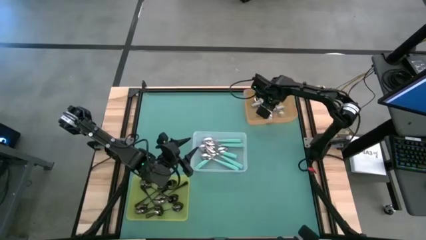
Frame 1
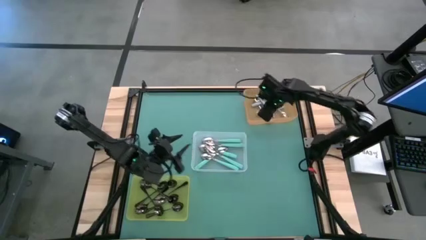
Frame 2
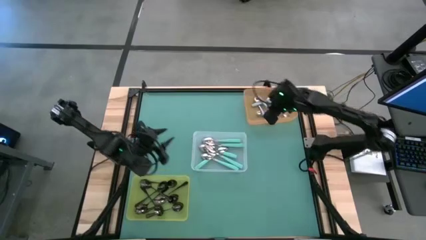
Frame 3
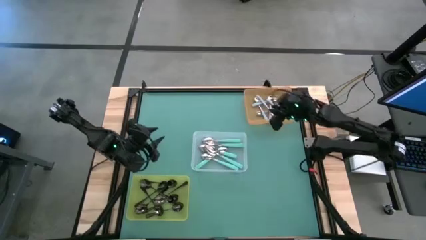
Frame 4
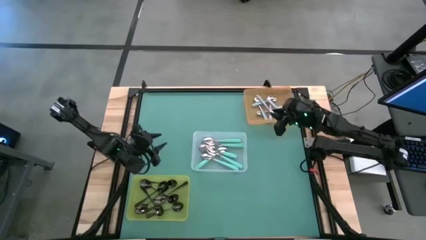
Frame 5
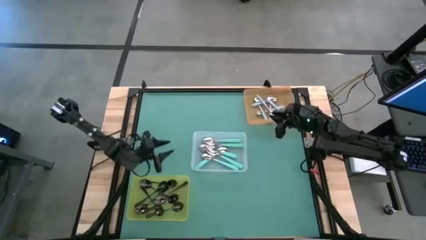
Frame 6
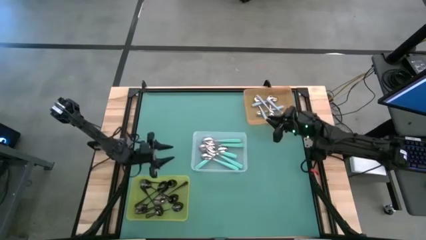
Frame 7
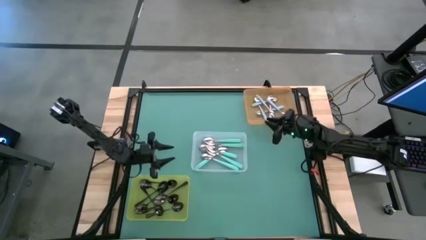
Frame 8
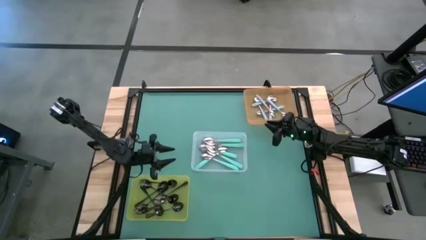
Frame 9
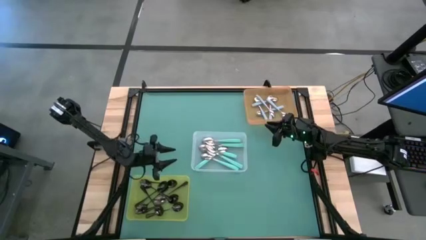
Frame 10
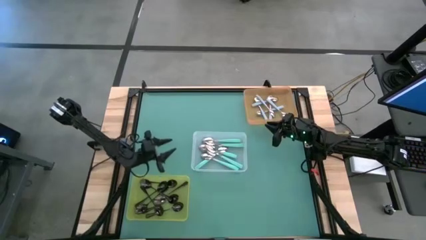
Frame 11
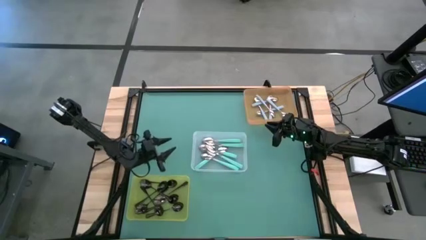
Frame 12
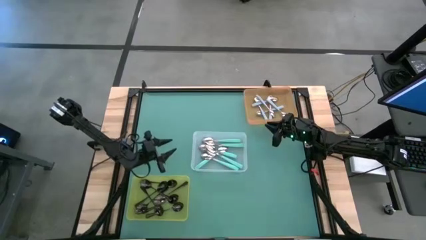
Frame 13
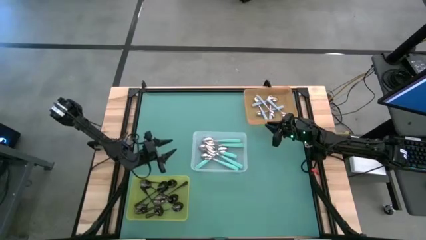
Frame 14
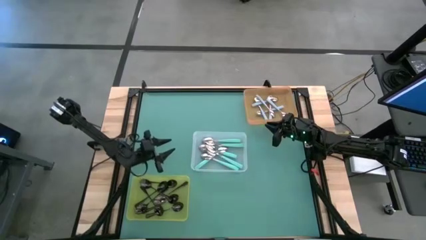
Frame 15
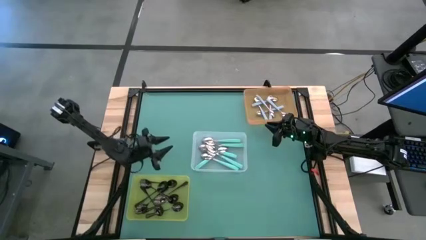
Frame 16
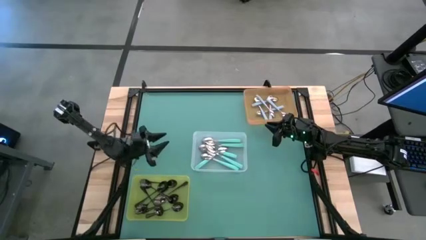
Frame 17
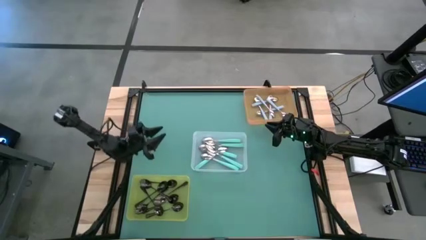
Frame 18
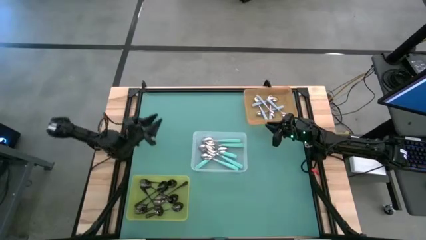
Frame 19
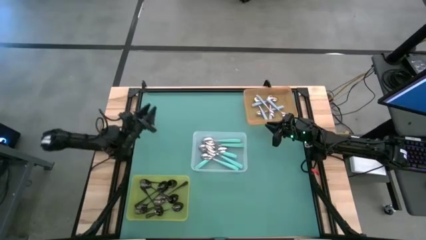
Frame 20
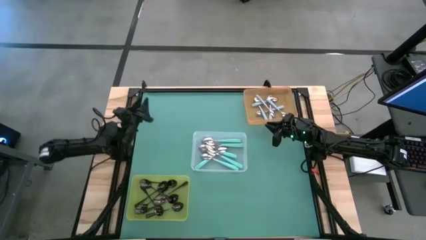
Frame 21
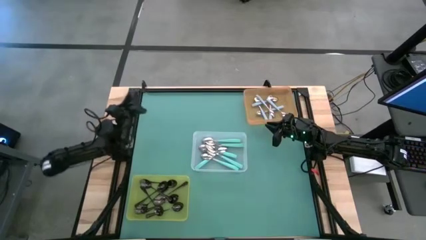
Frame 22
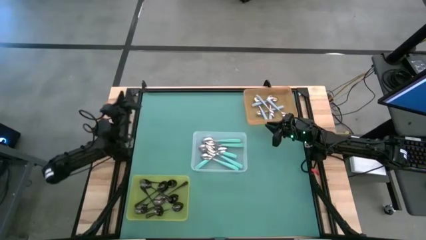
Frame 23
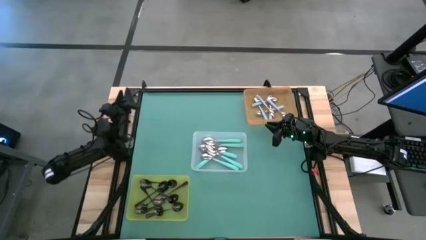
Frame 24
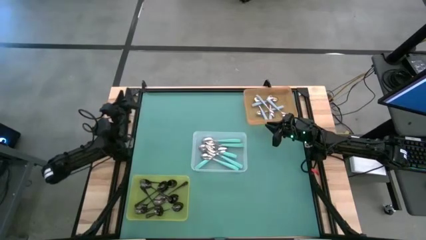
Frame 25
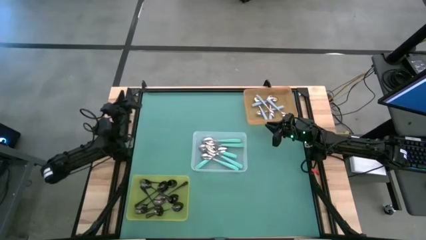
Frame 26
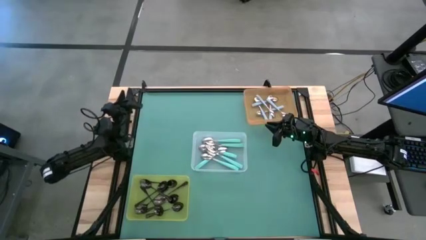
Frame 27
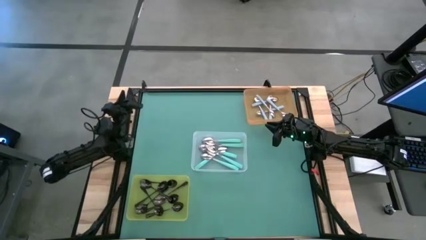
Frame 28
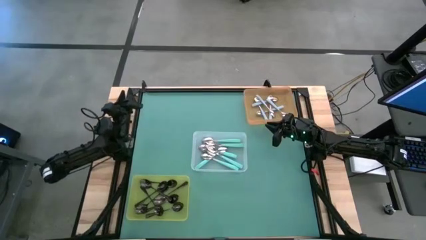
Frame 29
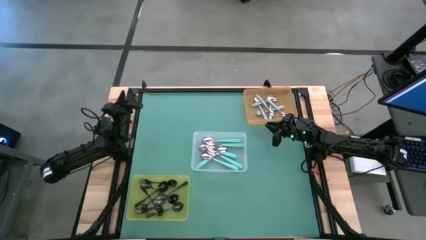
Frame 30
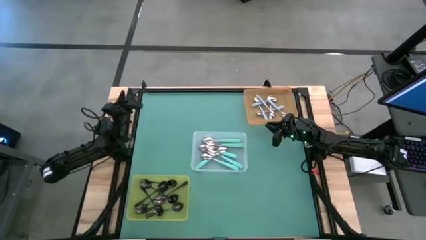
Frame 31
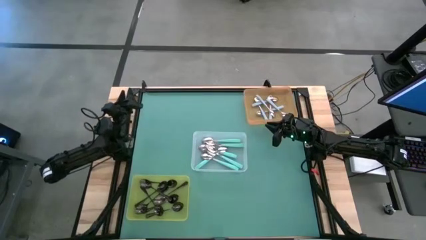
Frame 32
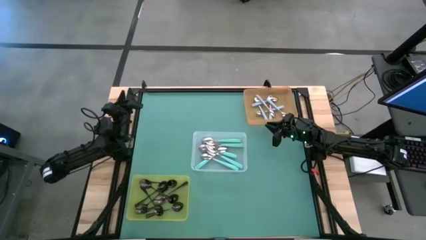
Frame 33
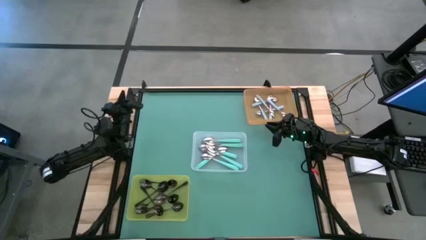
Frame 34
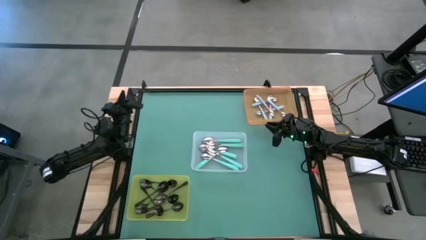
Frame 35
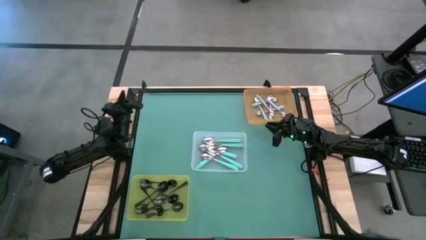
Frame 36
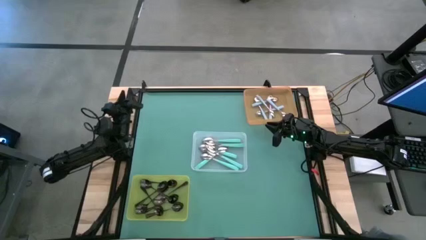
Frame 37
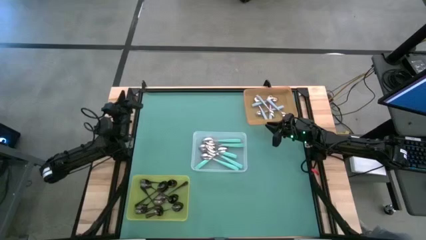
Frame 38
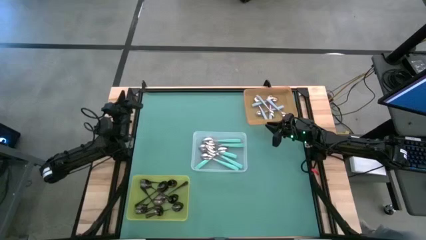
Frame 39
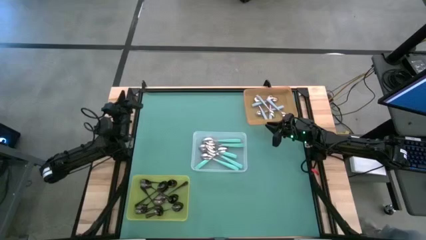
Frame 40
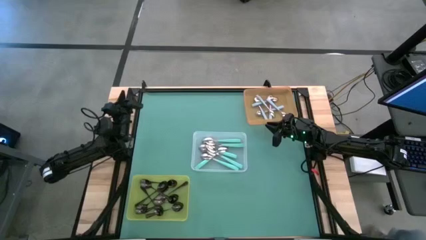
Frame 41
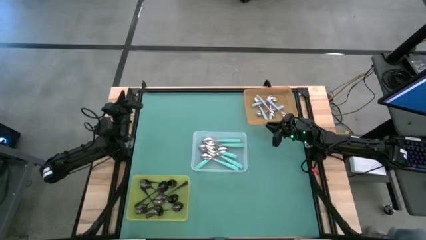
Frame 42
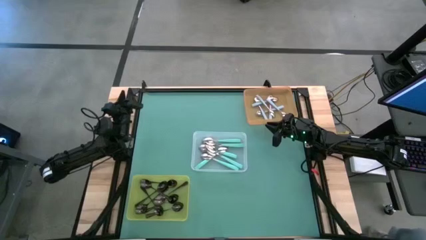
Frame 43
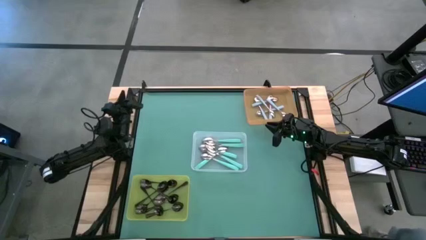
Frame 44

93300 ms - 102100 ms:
Task: Sort silverware by color (type)
Return to Home Position

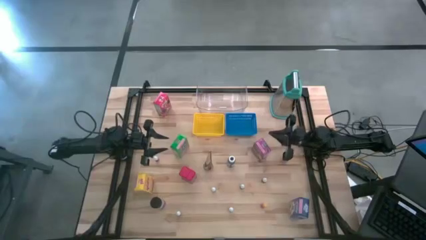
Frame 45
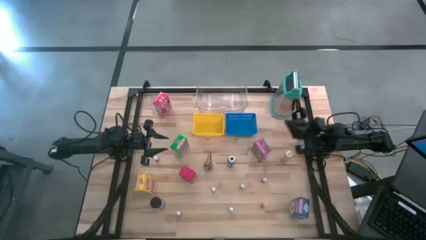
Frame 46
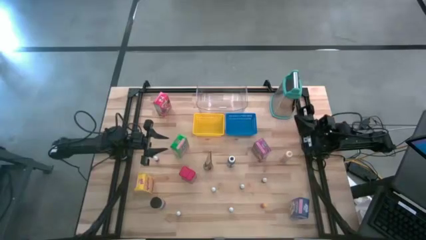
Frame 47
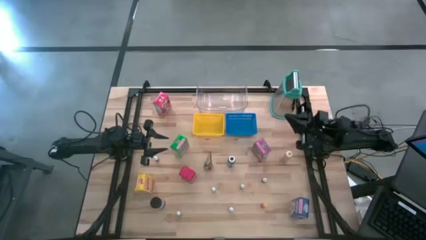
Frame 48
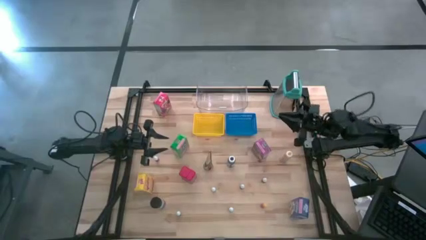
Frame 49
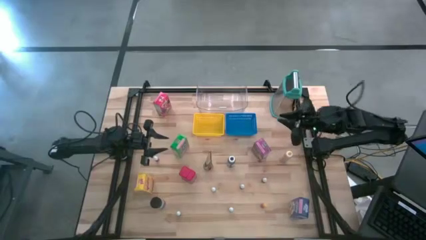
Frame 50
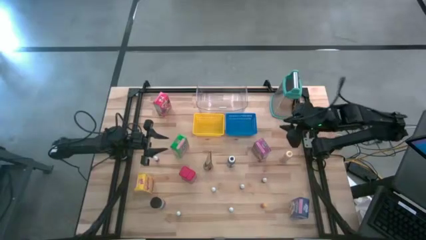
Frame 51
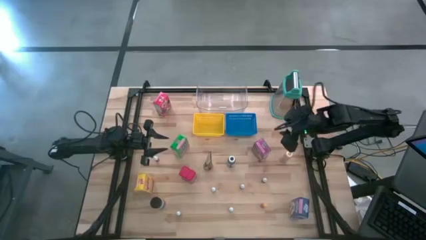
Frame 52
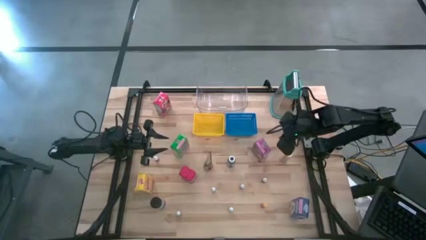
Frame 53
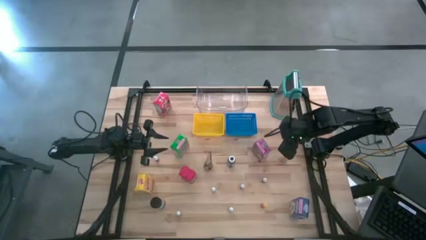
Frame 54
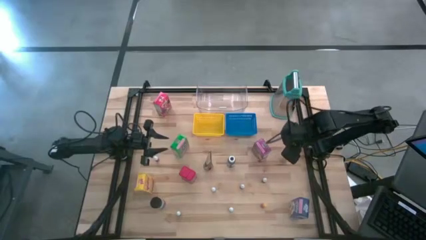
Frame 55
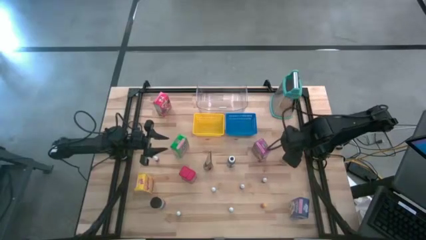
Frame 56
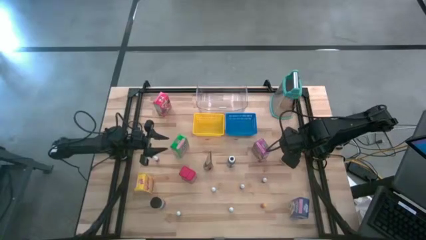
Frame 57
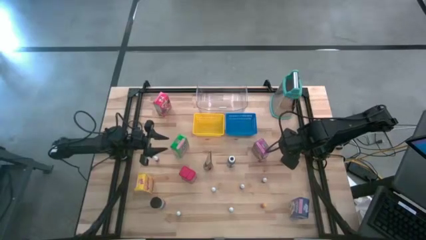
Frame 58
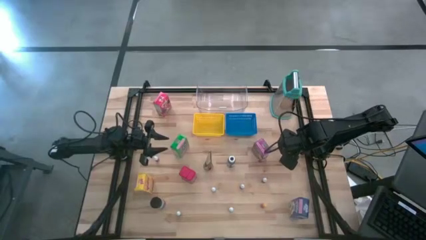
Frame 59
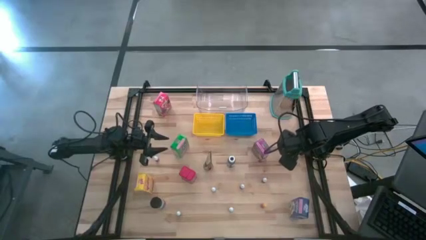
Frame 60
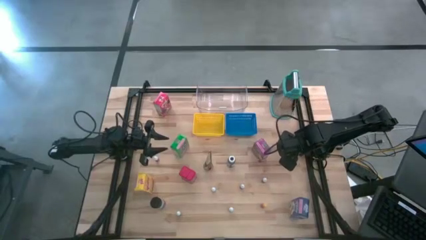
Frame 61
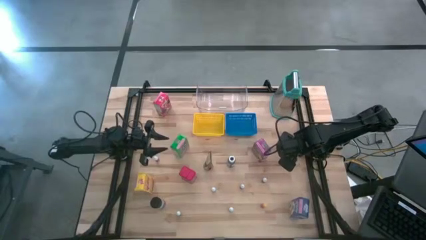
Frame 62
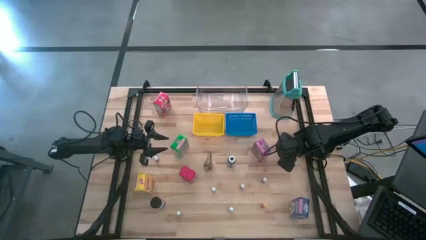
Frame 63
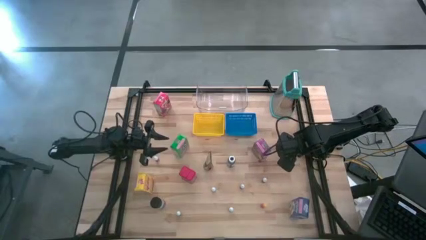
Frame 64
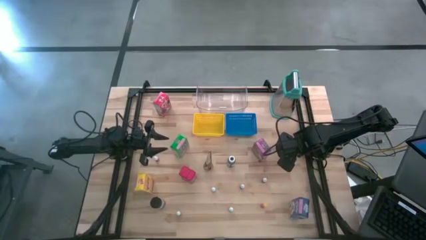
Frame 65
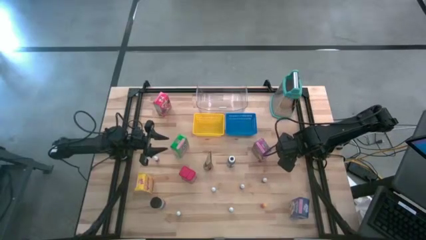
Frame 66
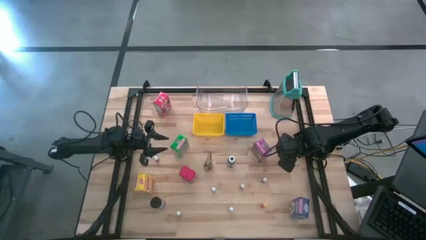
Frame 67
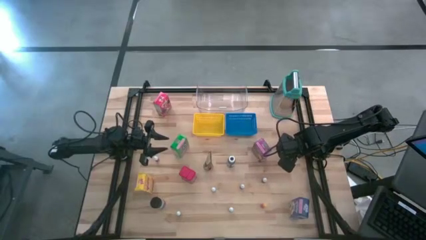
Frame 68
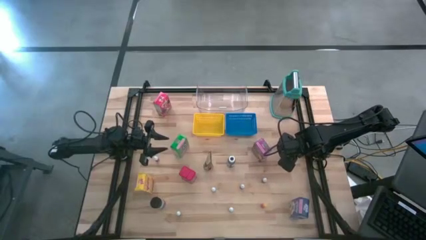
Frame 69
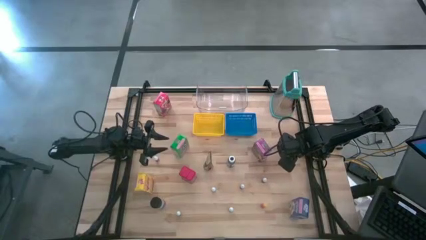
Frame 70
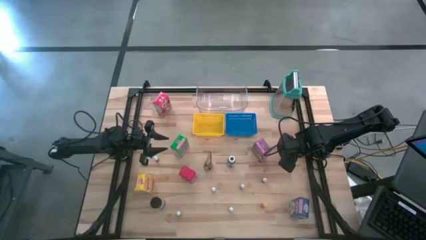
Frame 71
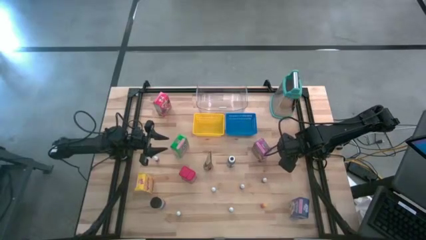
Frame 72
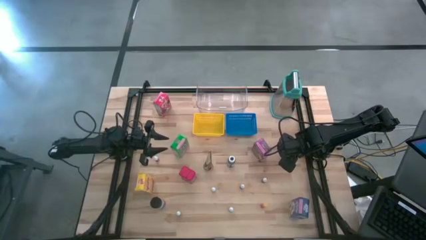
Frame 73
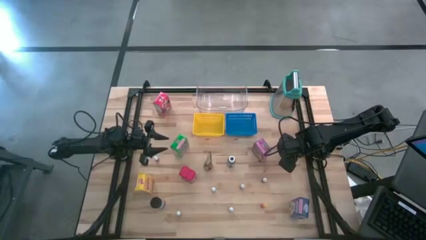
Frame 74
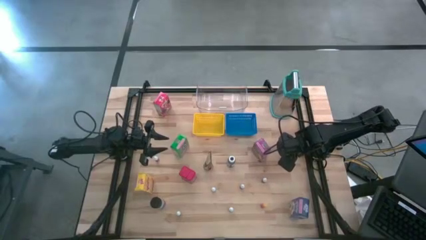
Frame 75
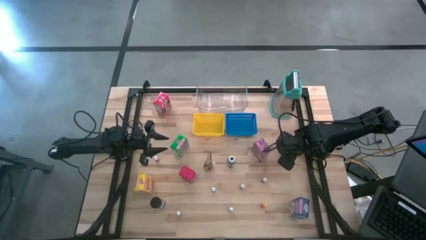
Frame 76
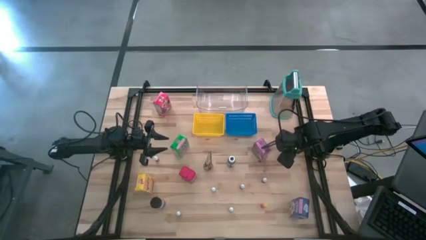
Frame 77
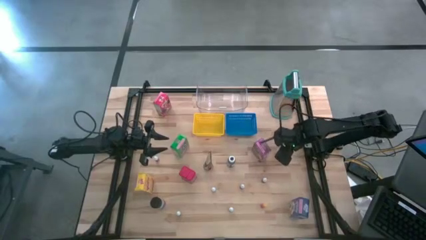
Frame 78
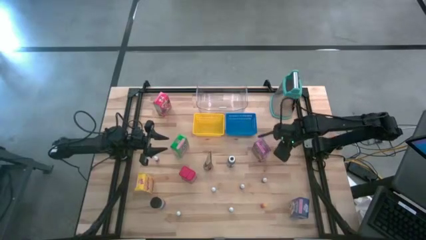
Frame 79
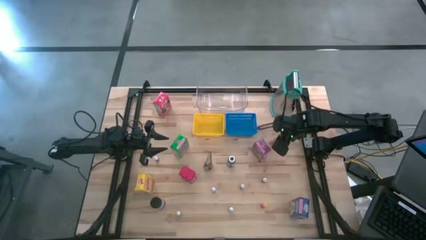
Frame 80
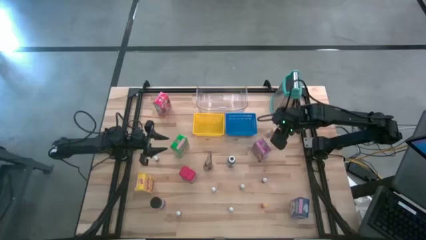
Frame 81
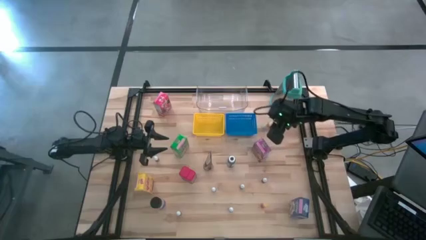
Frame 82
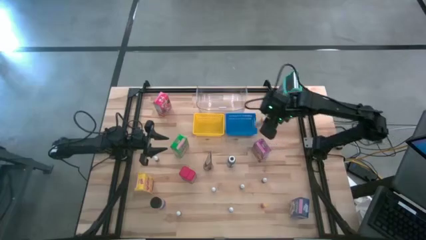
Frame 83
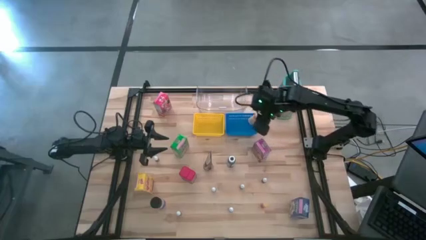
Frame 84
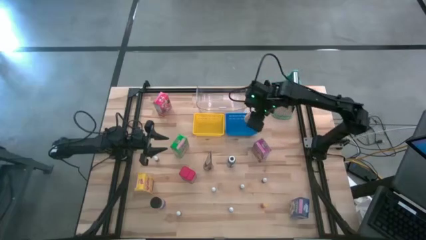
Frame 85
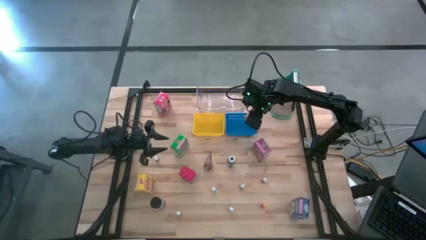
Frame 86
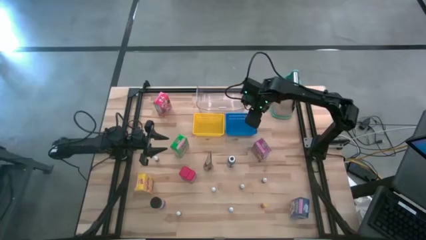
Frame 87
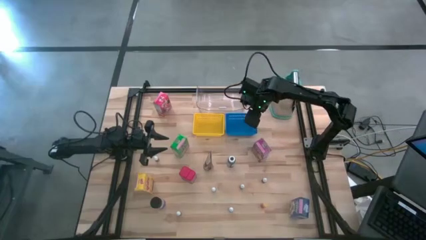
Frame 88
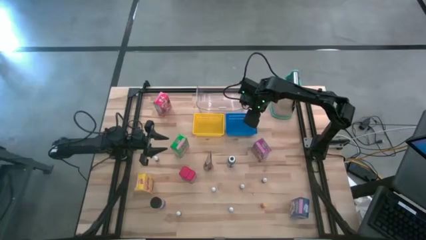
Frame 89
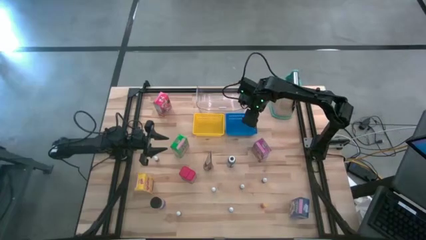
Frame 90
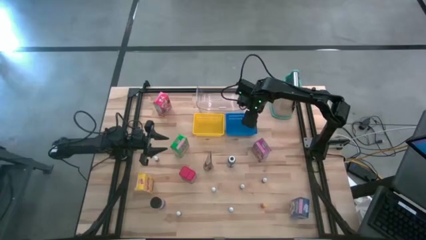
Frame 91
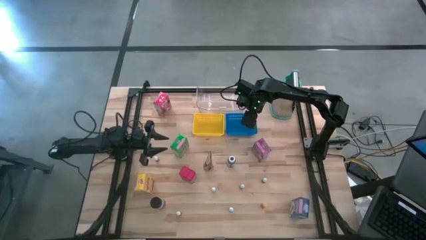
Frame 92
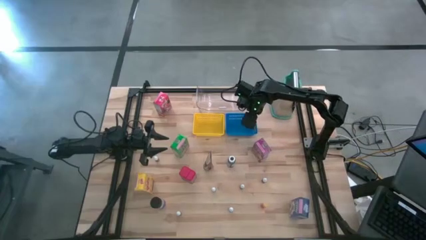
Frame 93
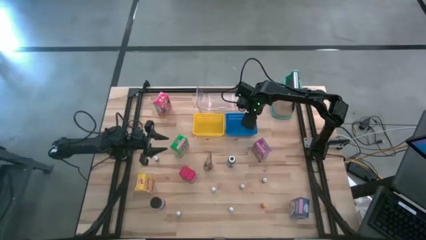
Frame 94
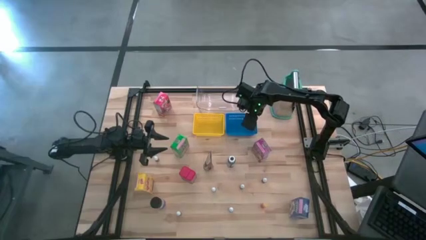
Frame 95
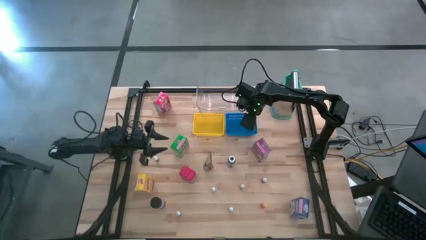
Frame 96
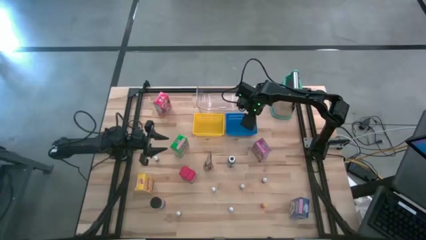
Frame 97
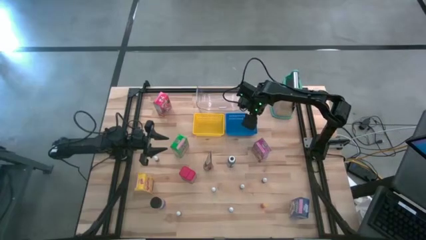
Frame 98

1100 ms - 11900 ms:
Task: Pick & Place Kitchen Items
Put the yellow food coloring bottle into the blue bin
